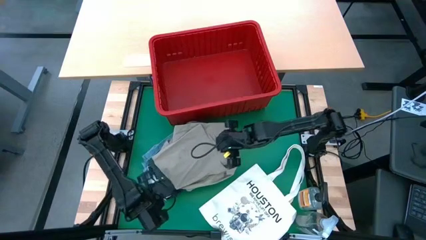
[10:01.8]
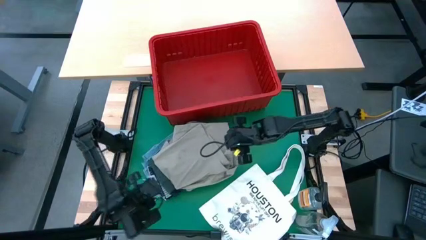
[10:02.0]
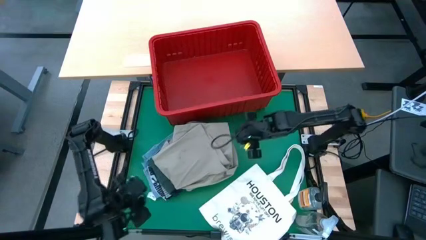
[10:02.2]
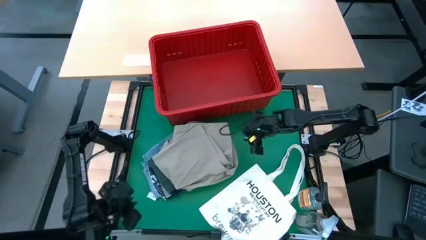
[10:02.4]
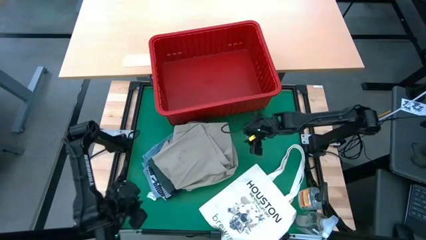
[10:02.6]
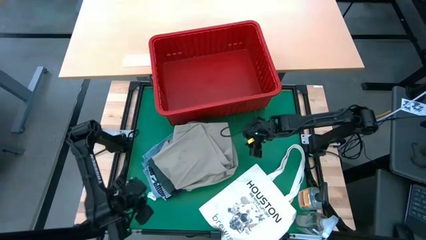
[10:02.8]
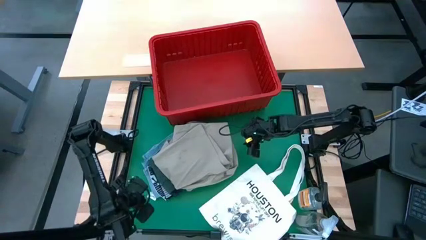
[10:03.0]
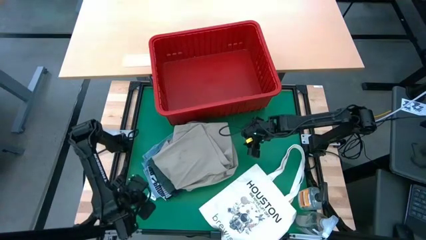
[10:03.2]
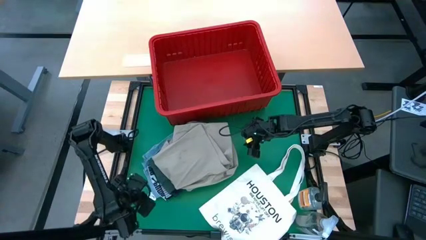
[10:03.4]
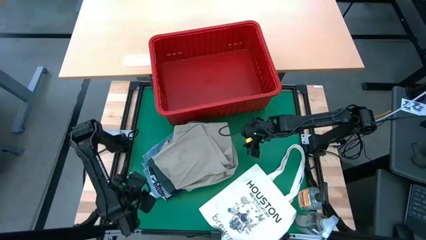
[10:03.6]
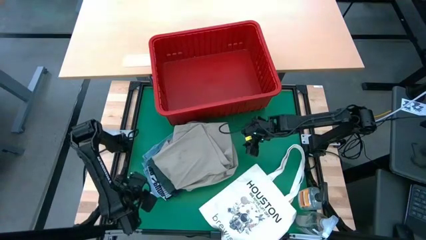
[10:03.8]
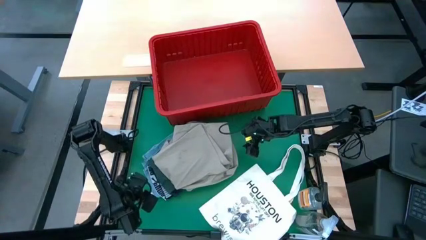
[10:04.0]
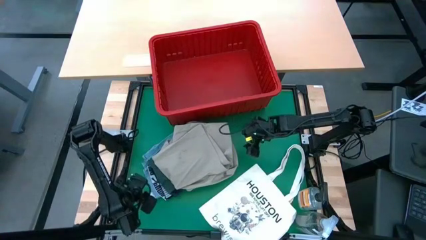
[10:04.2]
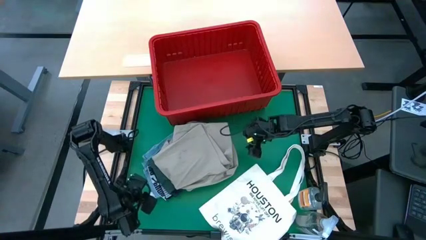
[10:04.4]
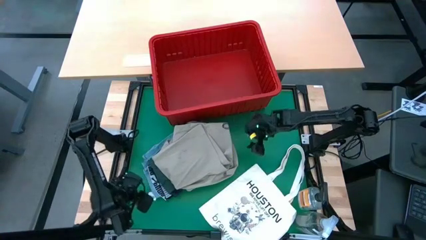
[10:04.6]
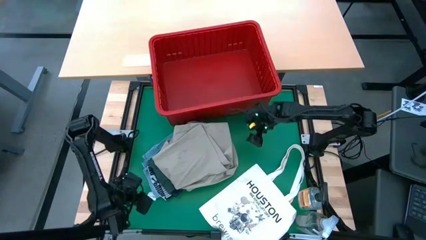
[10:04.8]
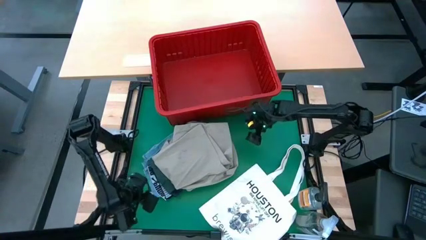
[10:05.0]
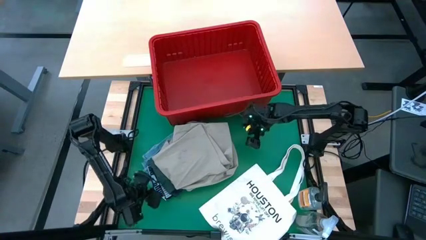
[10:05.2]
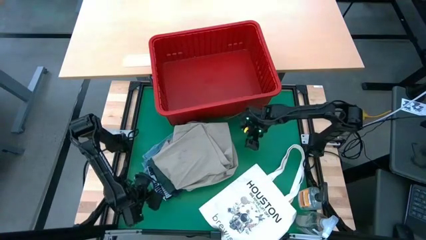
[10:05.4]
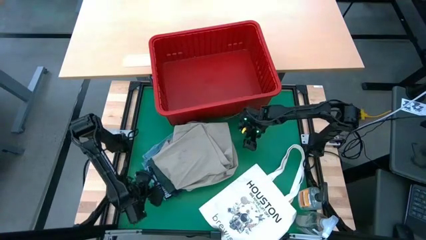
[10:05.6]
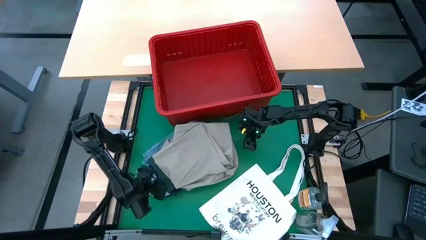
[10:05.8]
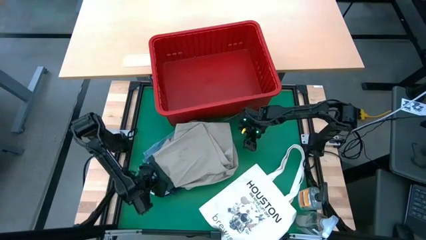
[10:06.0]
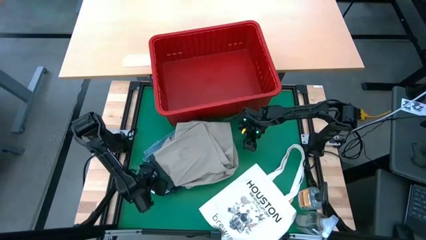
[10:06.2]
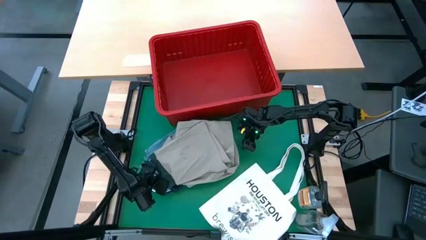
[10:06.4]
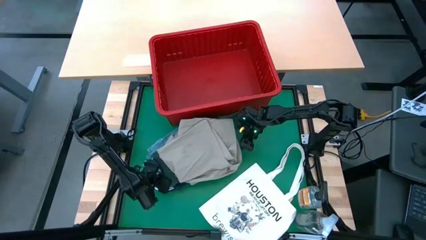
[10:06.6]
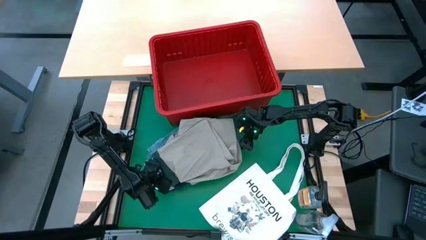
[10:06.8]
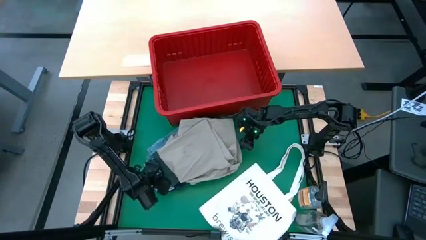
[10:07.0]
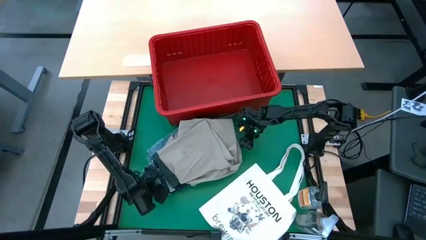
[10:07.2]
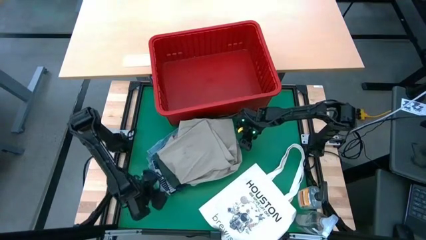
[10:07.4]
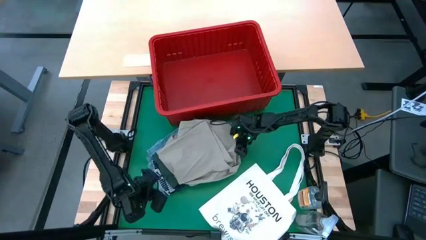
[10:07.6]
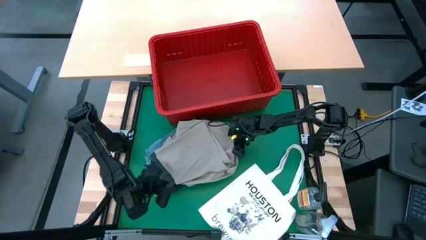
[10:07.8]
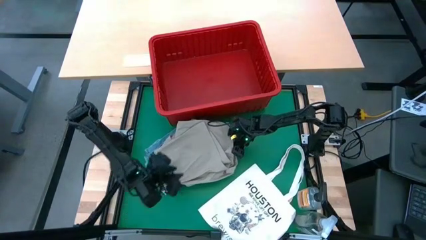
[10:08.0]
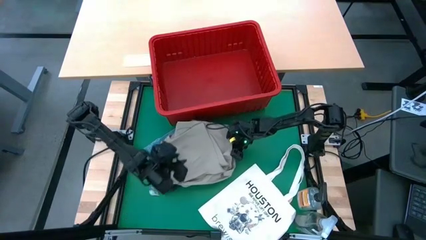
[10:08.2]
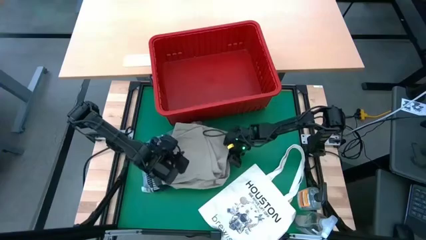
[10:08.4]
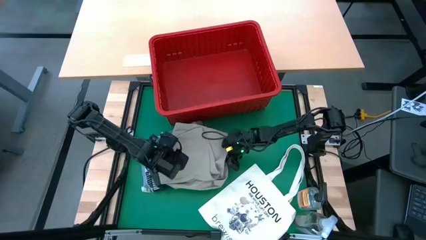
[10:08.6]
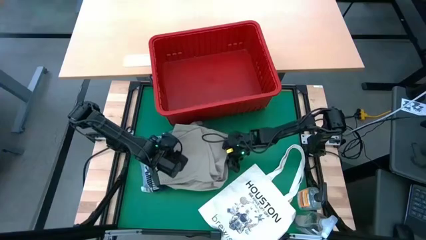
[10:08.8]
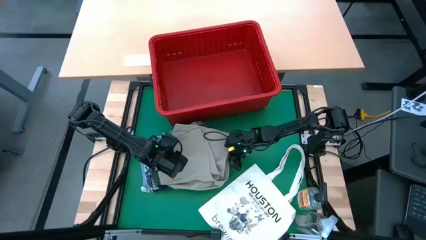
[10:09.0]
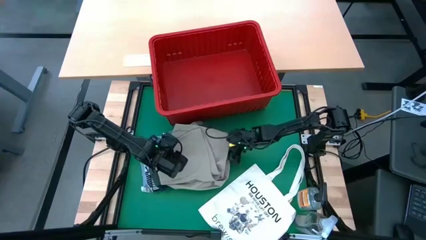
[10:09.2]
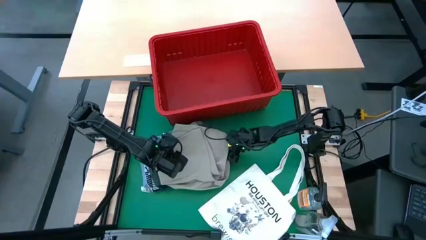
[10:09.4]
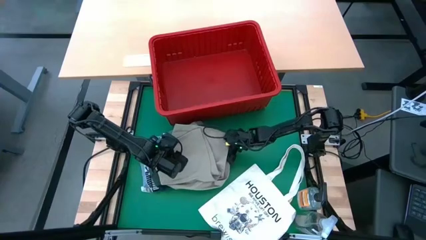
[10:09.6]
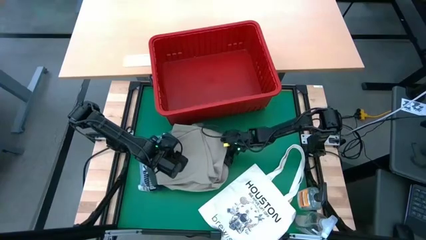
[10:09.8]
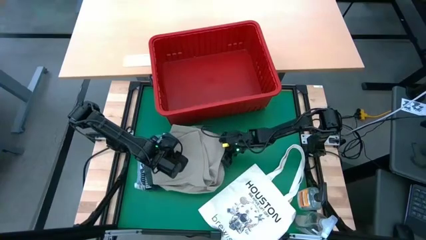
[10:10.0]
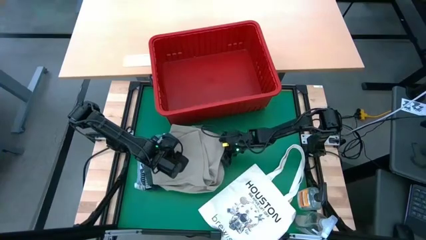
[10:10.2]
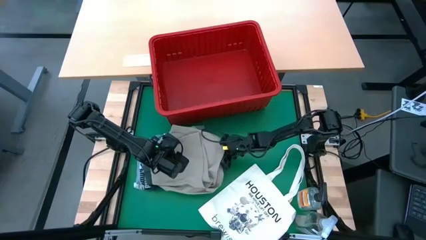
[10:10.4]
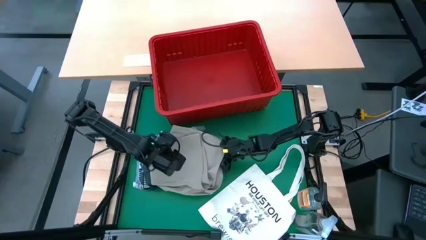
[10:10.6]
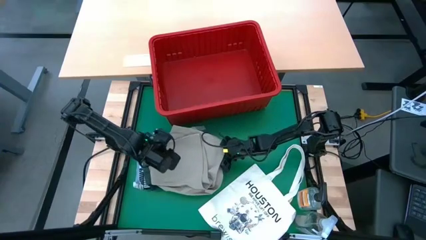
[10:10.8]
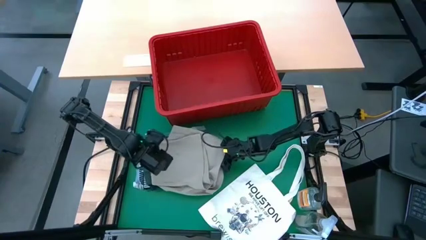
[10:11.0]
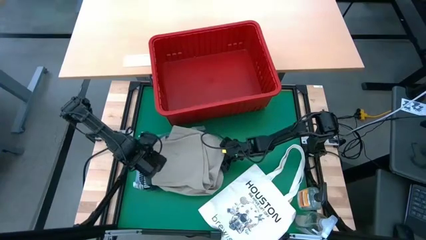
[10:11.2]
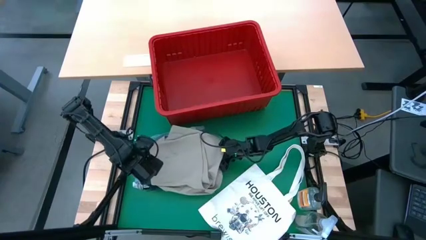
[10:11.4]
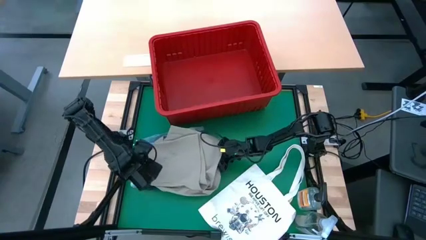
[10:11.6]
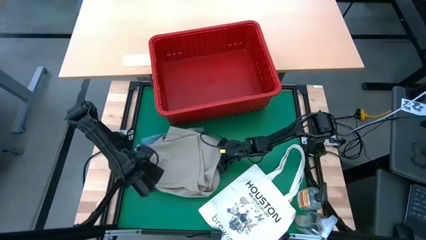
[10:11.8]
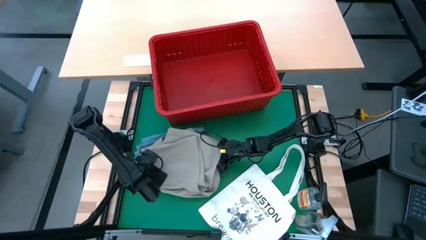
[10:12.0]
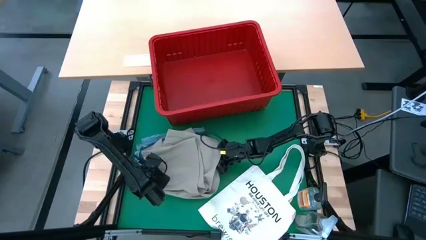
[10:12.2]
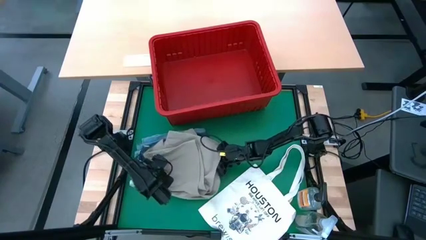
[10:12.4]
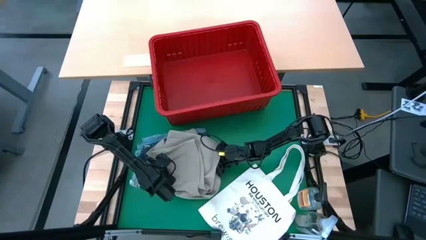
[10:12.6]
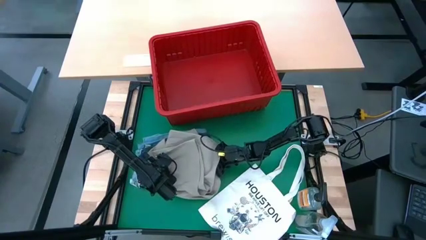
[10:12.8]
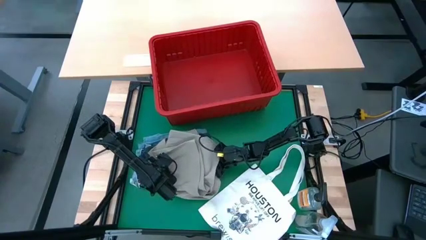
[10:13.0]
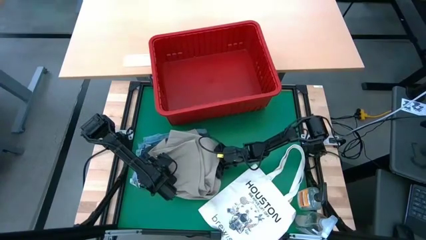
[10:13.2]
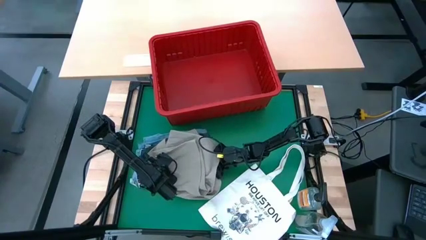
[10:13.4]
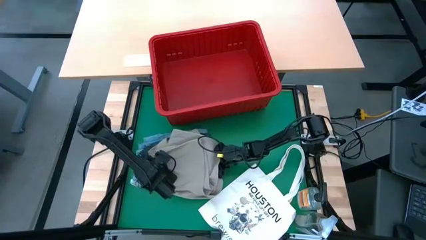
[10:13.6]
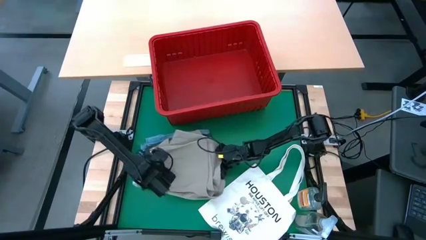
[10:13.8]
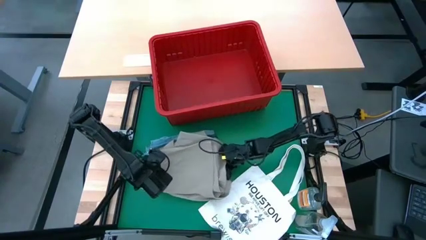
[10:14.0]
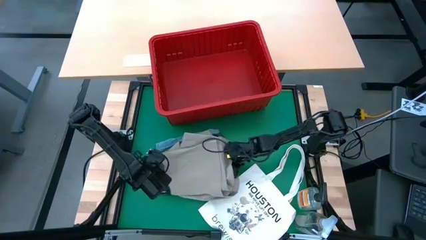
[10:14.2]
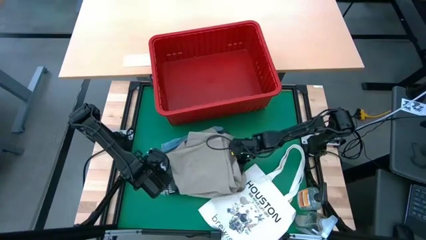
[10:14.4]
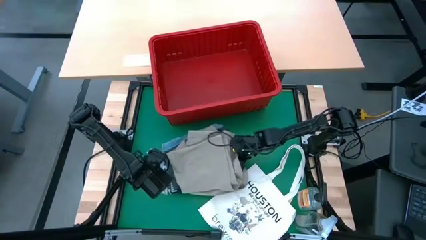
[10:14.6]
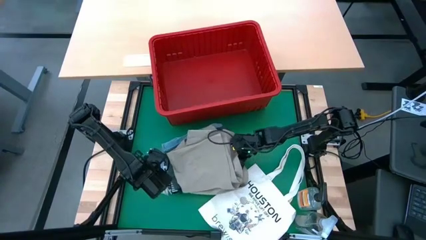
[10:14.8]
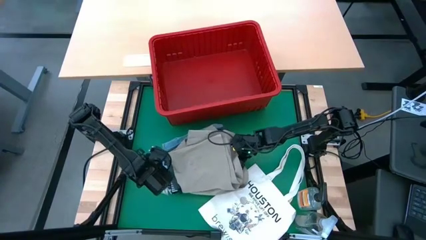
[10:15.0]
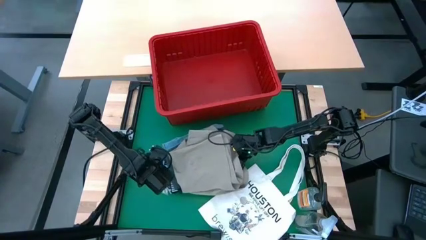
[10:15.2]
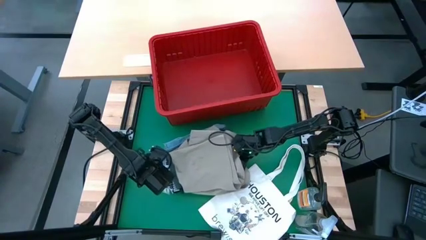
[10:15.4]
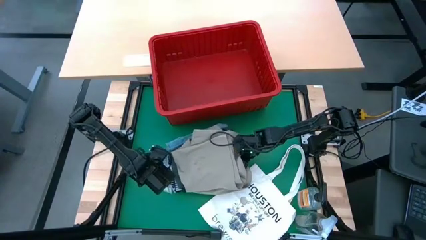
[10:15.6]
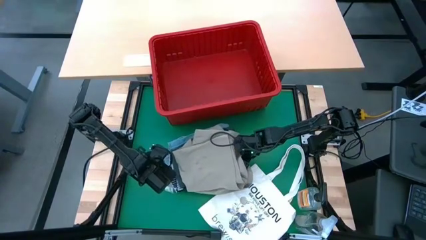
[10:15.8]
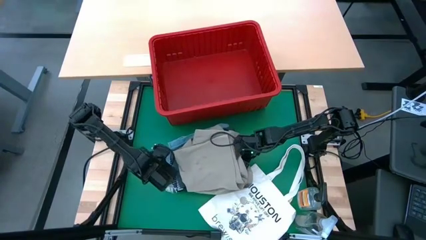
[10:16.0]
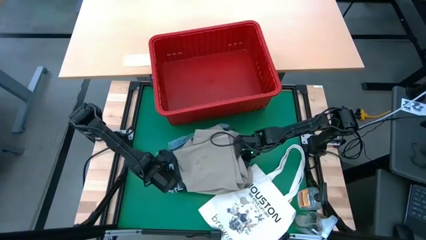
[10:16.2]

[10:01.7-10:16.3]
Task: Fold Laundry from Bin
Put the stacked clothes into the red bin

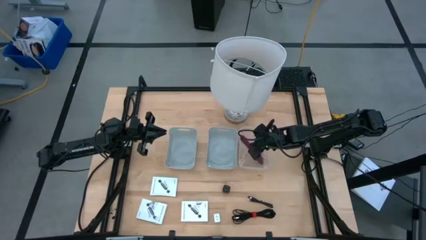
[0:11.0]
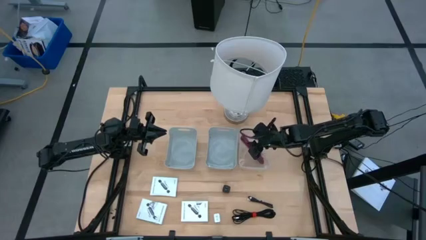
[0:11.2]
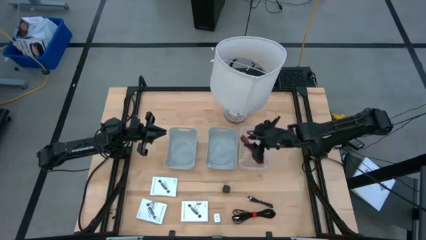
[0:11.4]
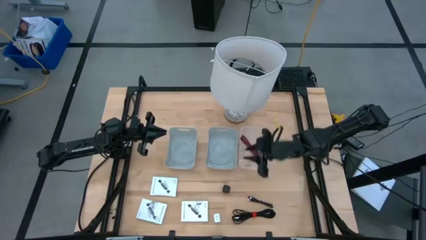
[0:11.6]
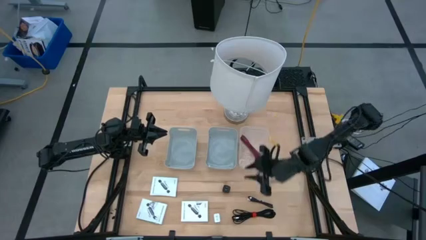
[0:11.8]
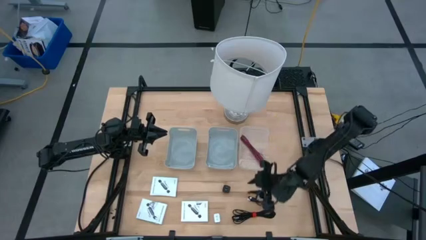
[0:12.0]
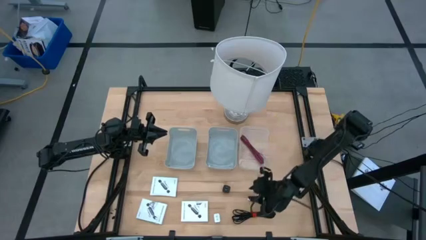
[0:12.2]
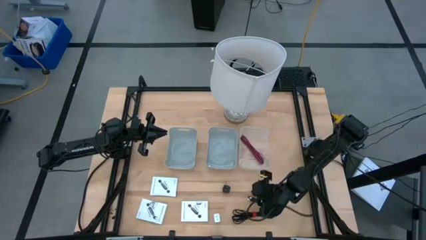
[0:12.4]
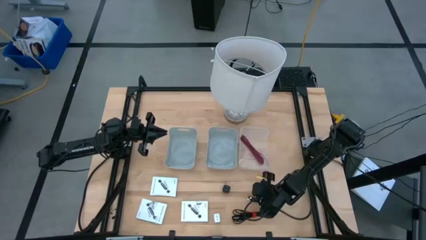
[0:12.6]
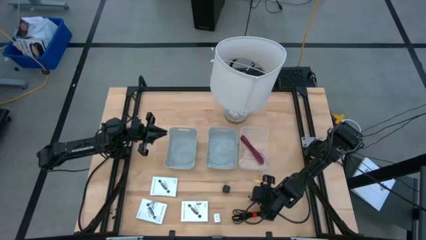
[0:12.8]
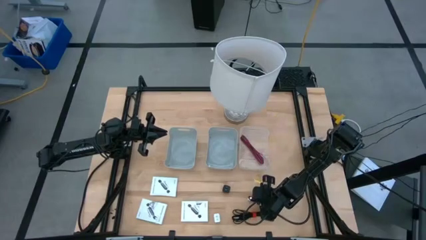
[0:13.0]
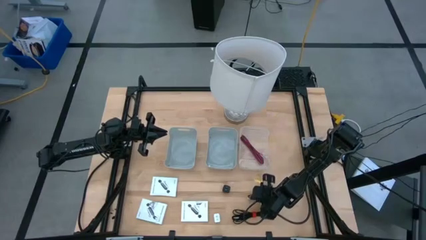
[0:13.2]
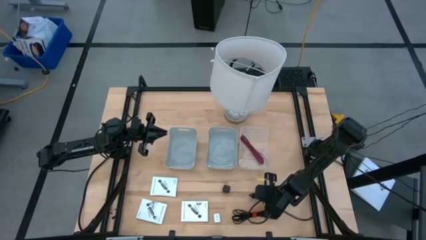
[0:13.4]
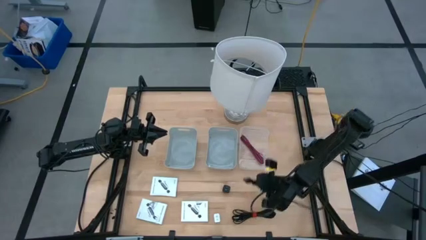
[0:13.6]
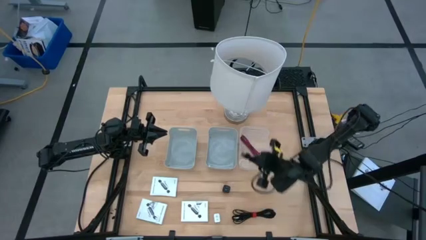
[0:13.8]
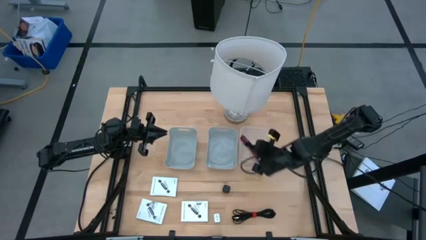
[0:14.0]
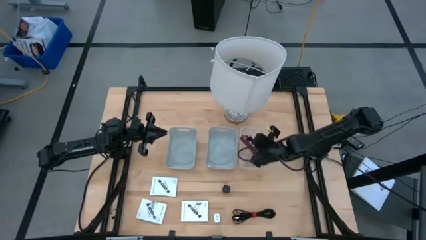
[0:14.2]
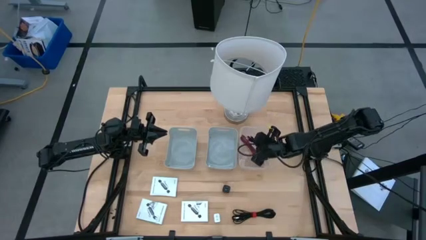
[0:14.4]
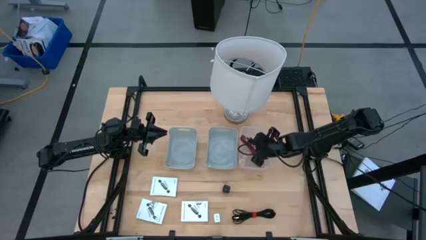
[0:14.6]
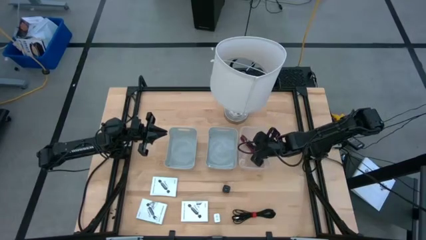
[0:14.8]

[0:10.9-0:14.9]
Task: Pick and place items into bin
Put the top black charger cable into the transparent bin
